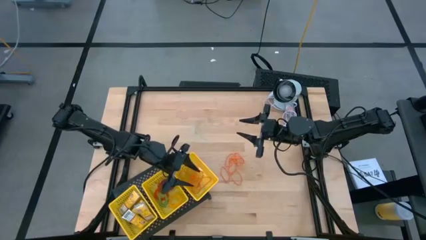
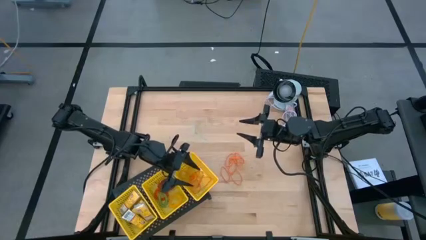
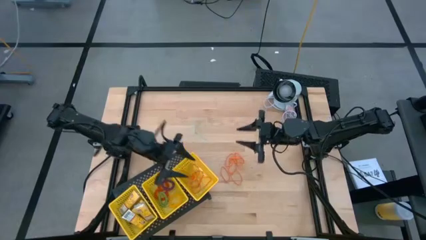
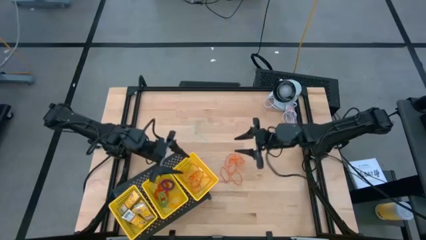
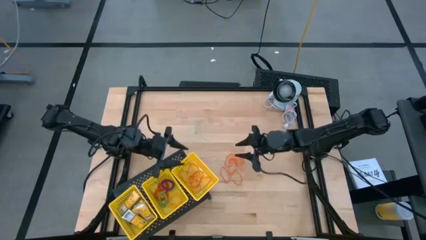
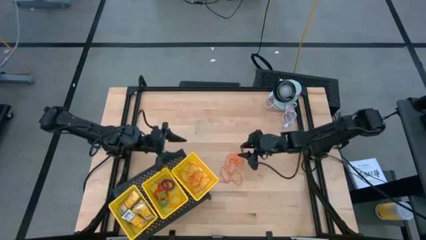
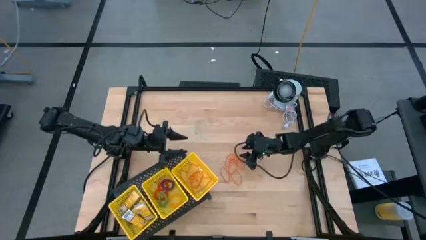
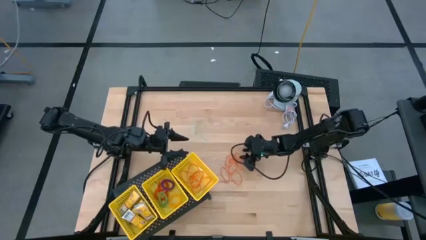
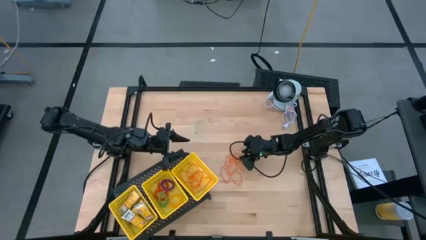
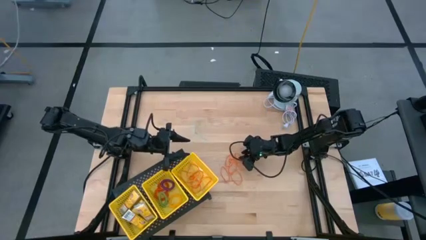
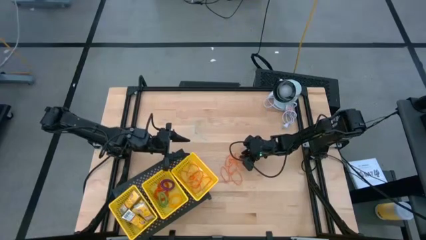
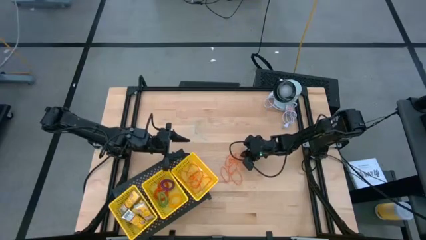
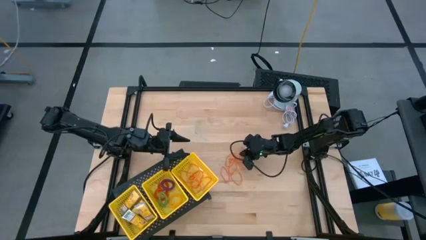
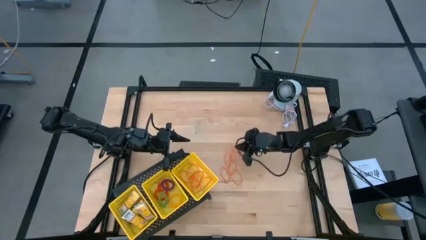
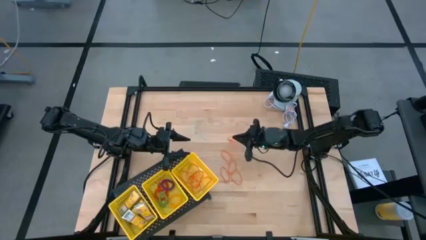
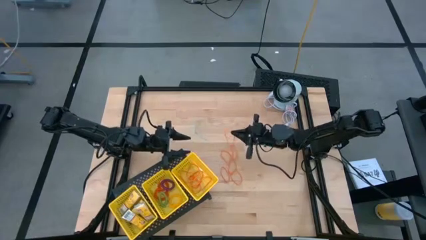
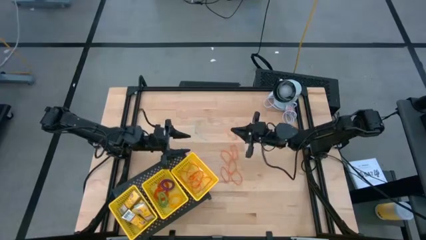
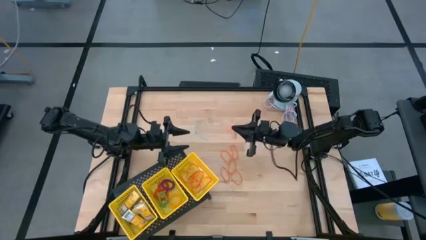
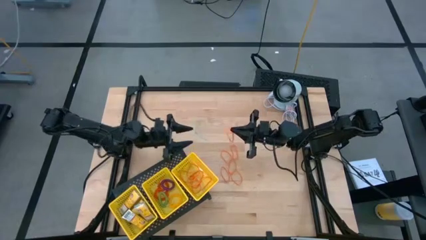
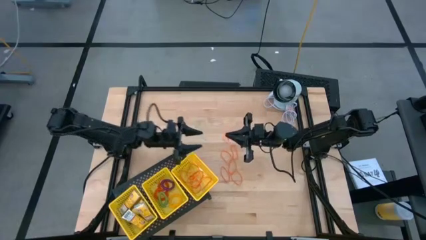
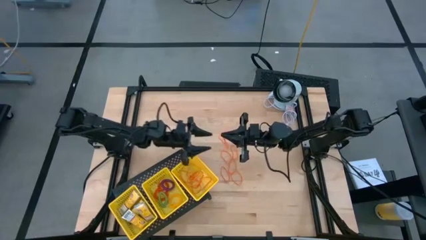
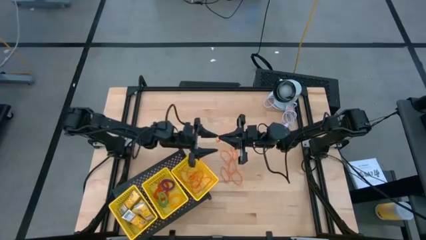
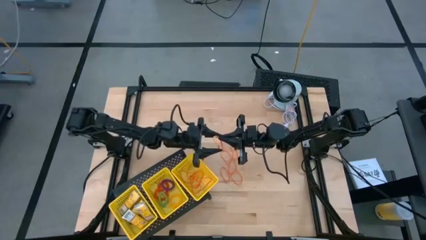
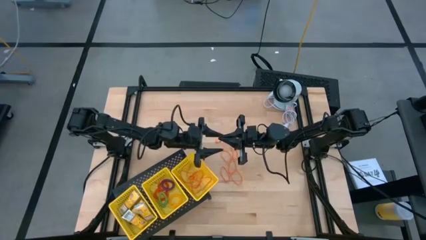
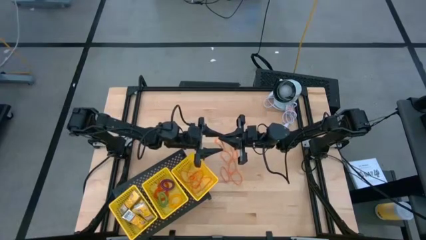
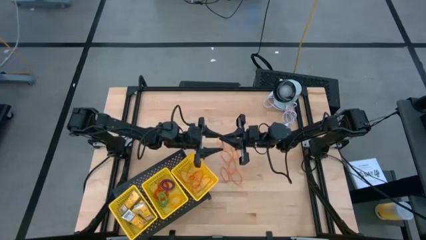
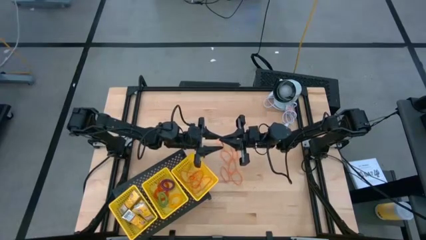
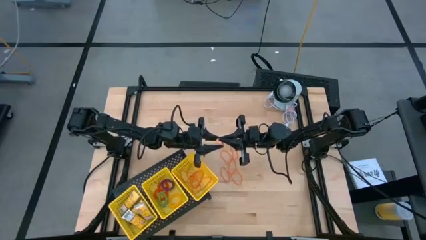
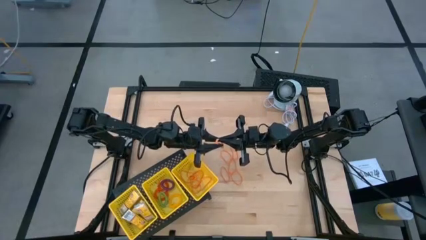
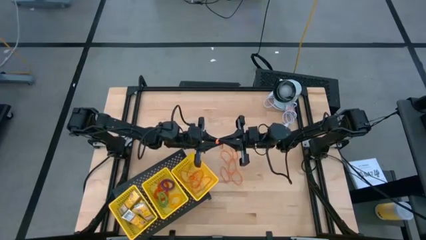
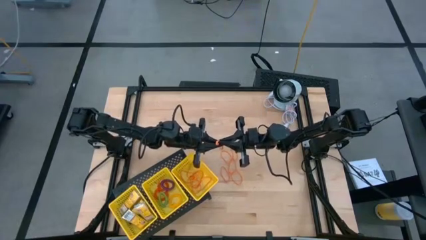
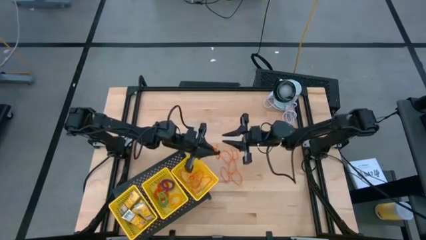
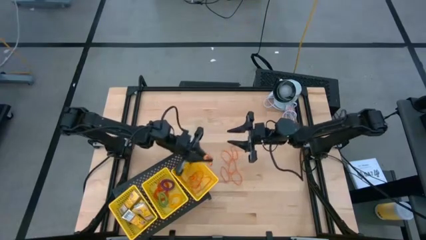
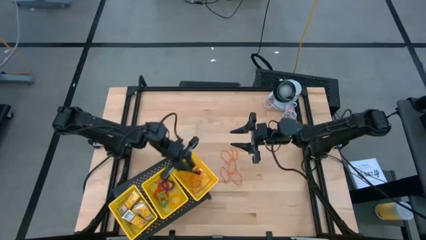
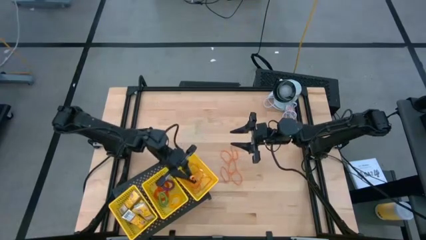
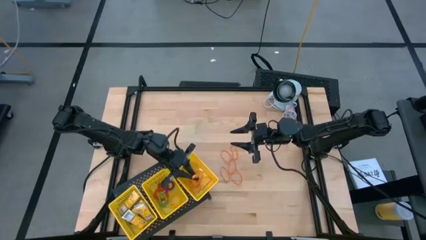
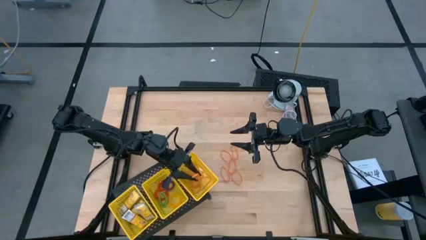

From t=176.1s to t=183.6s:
Task: Pick & Place Office Desk Supplies
Put the orange rubber band into the right yellow bin on the shelf

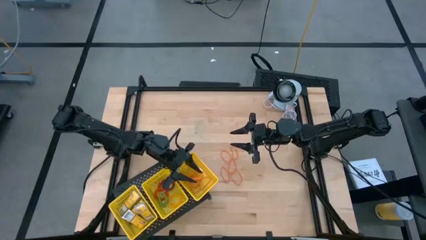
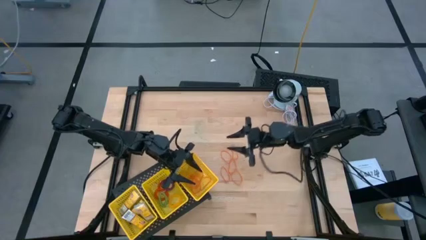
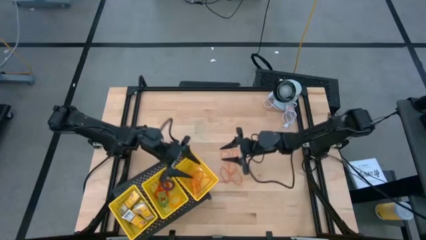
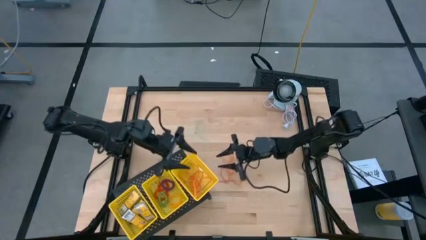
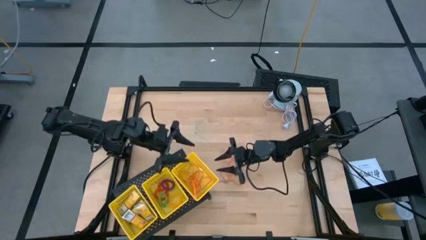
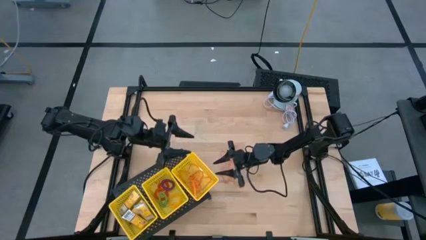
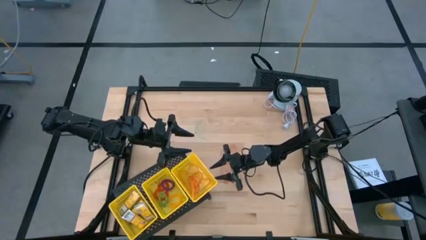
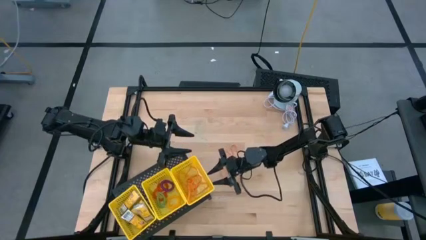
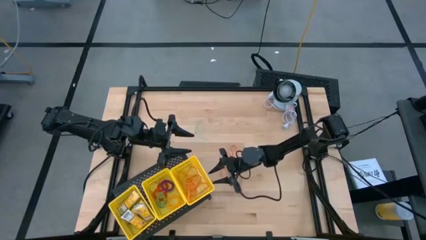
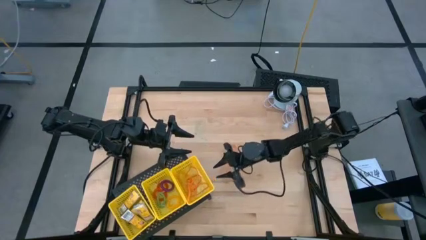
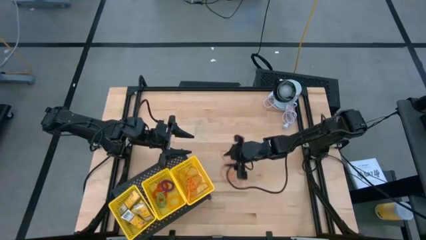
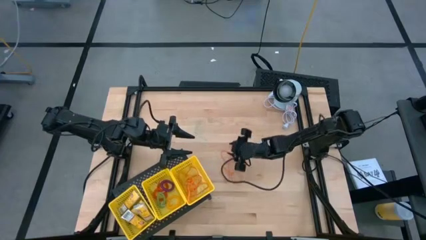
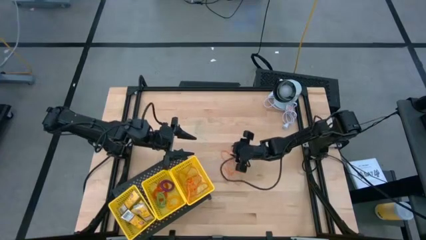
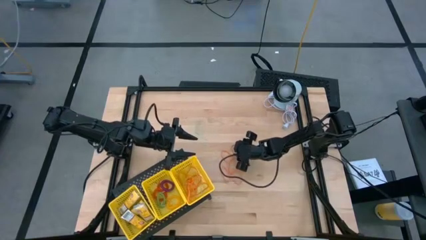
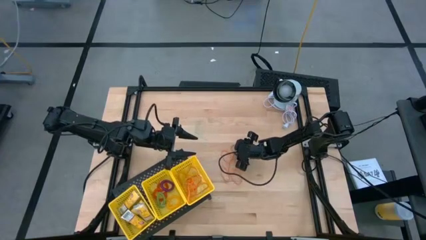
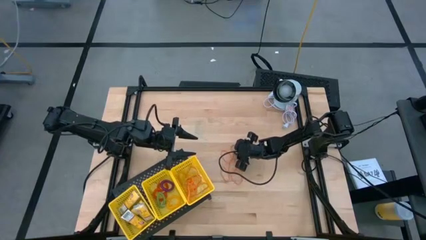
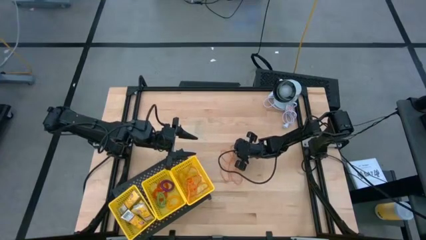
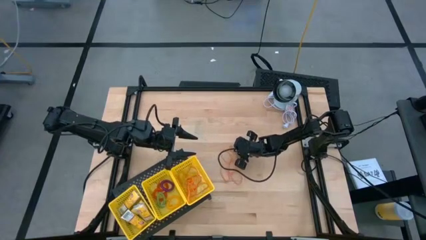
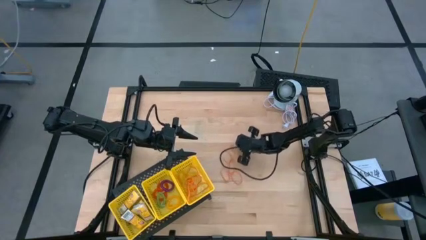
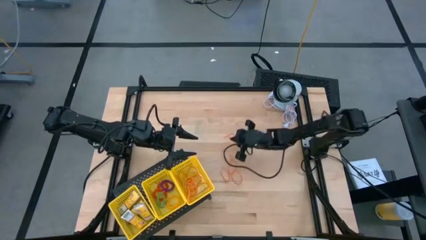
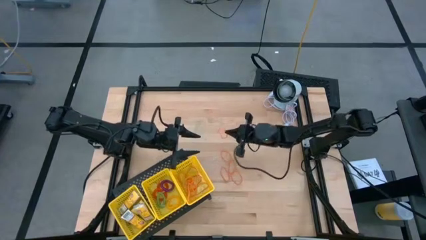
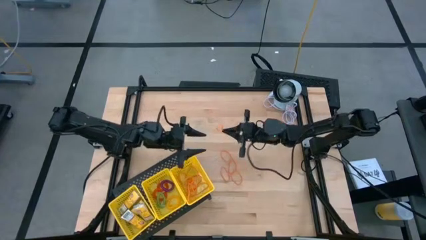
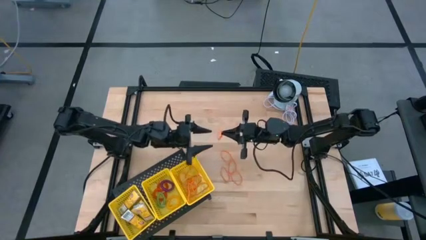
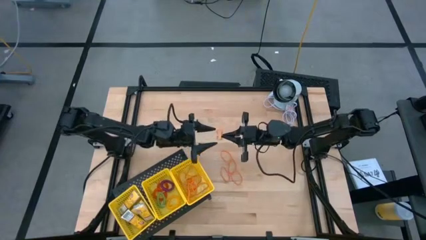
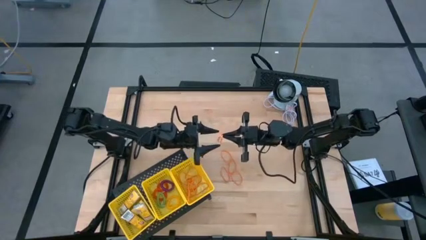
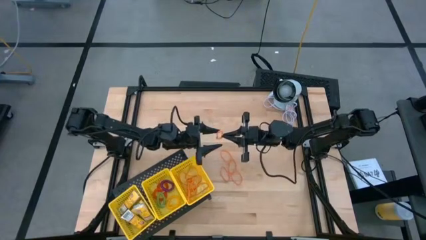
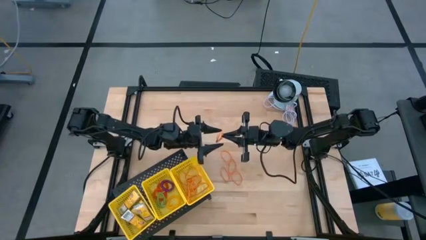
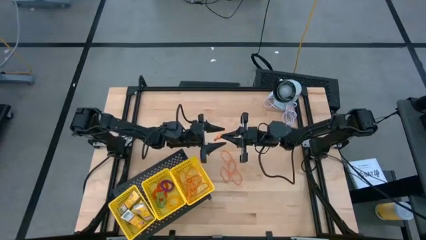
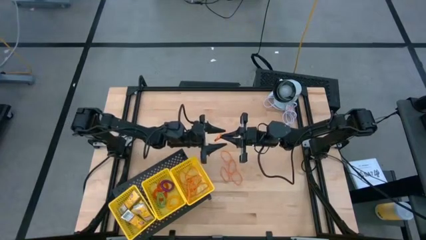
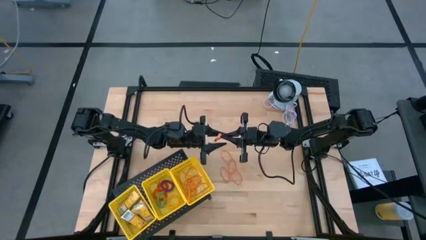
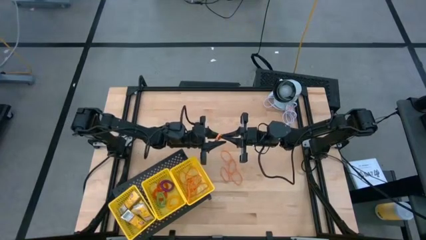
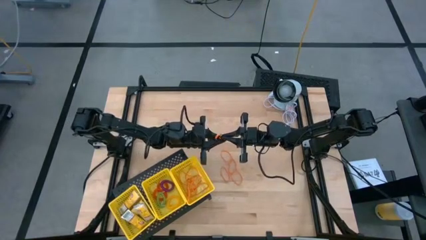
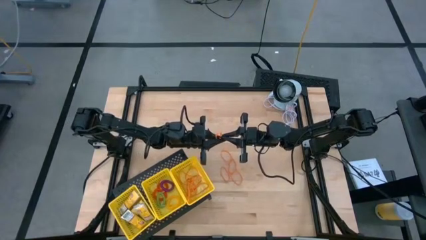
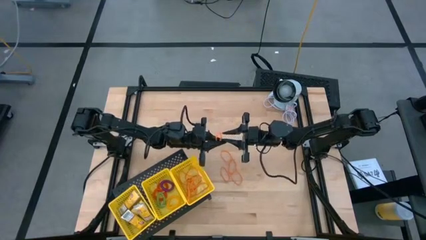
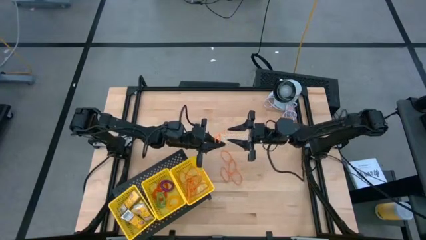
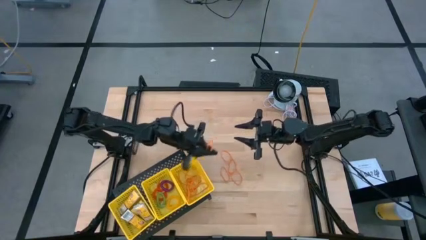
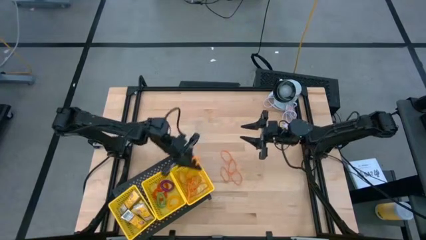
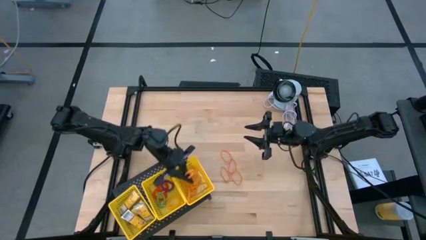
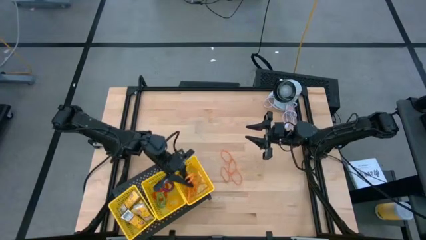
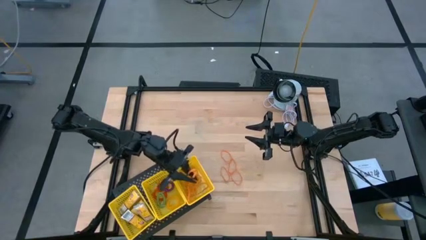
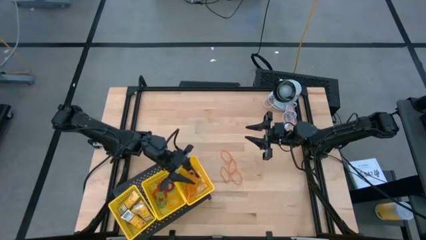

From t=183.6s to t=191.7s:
Put the orange rubber band into the right yellow bin on the shelf
